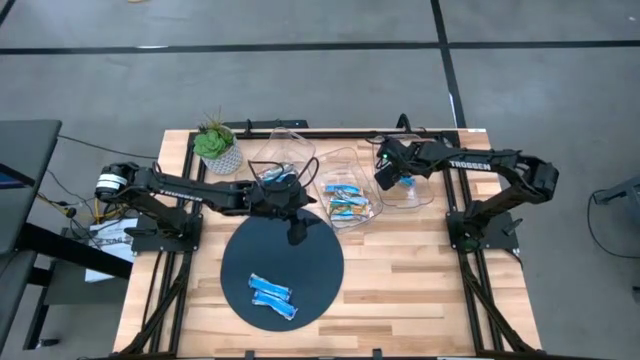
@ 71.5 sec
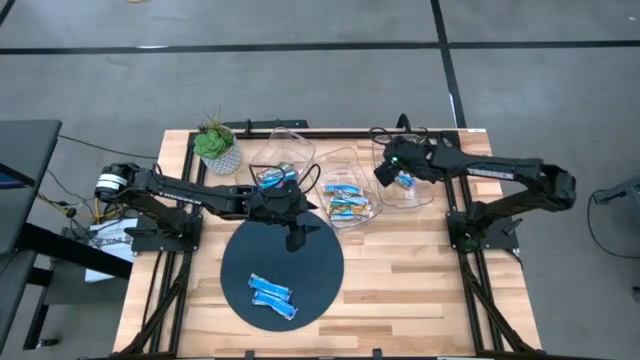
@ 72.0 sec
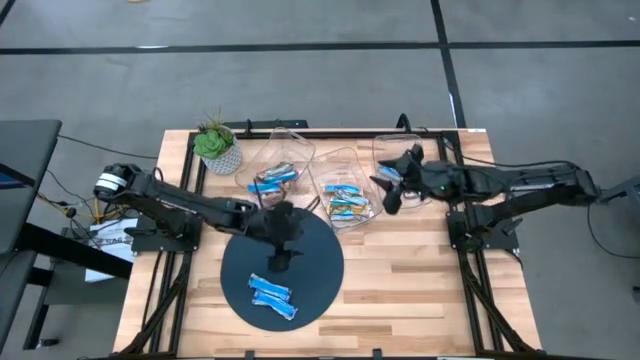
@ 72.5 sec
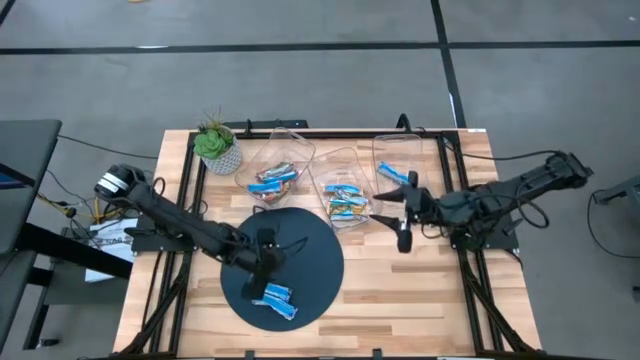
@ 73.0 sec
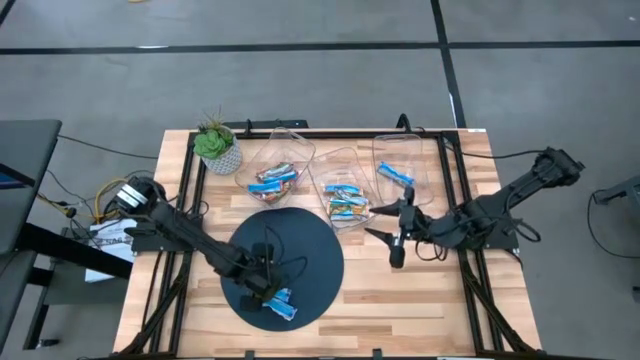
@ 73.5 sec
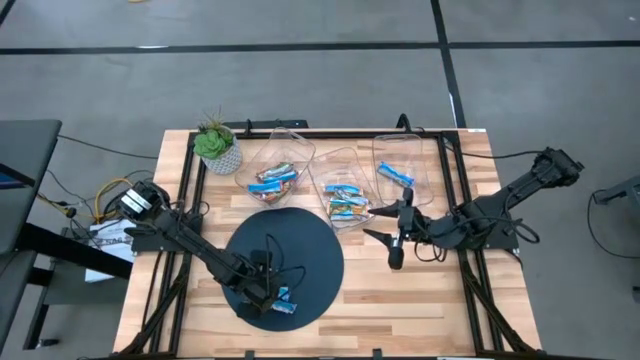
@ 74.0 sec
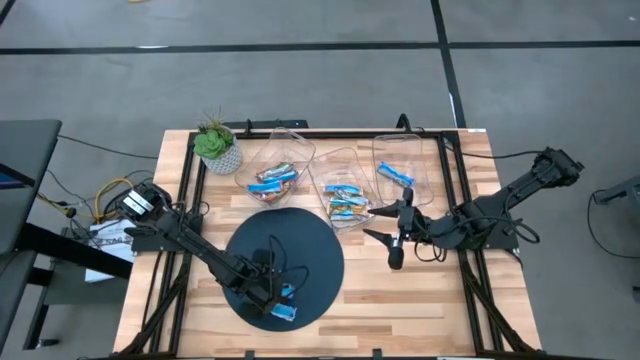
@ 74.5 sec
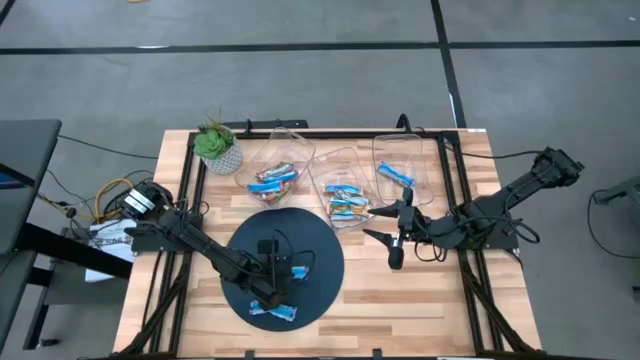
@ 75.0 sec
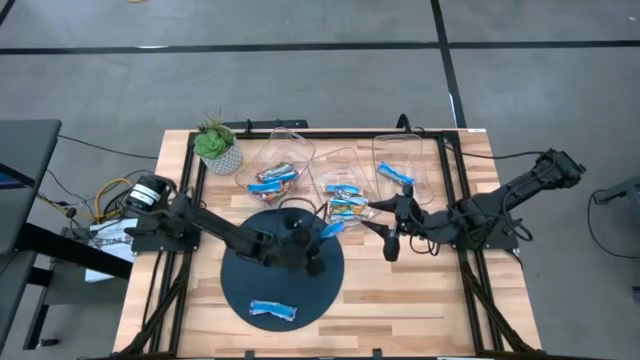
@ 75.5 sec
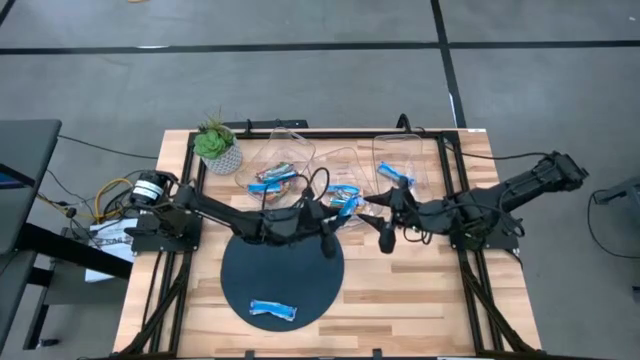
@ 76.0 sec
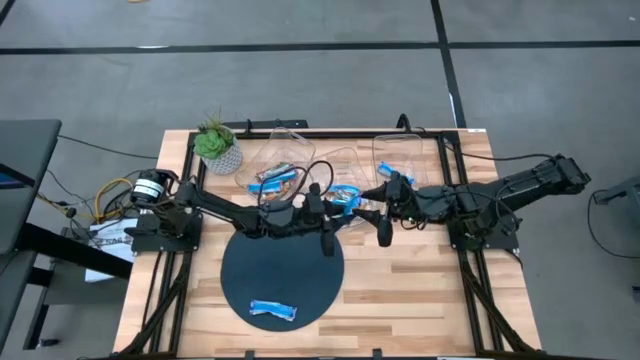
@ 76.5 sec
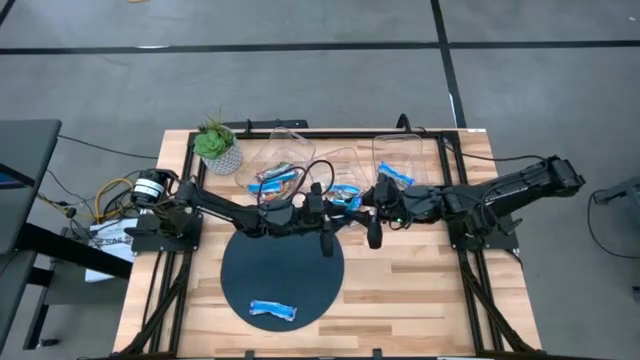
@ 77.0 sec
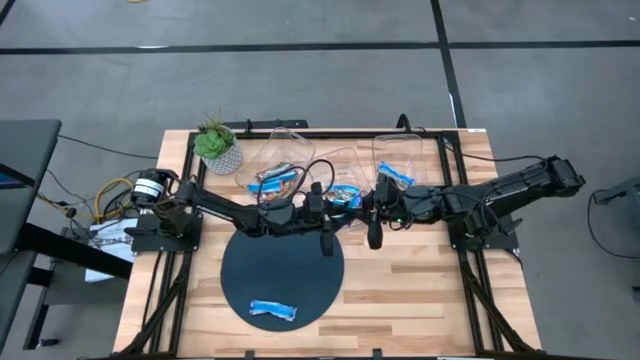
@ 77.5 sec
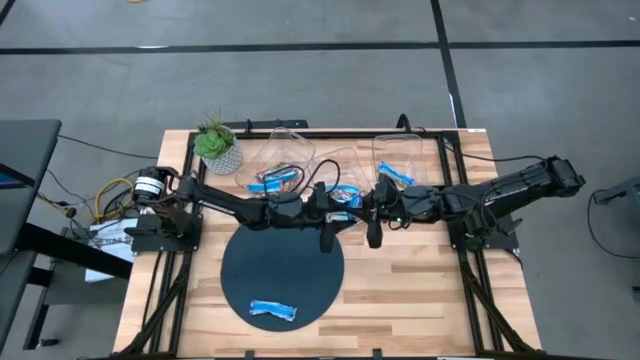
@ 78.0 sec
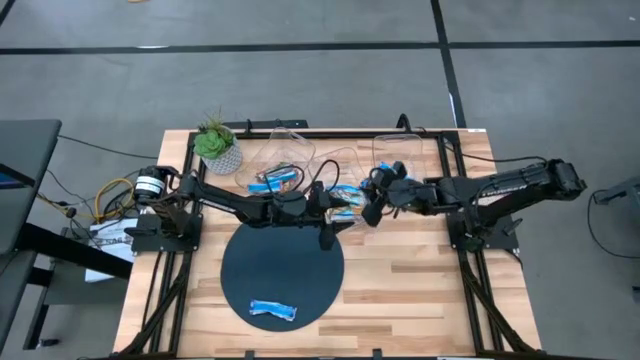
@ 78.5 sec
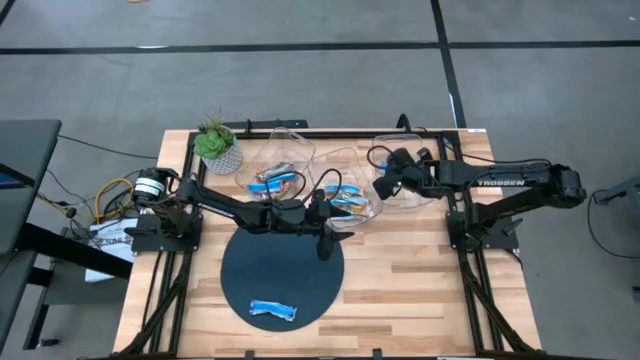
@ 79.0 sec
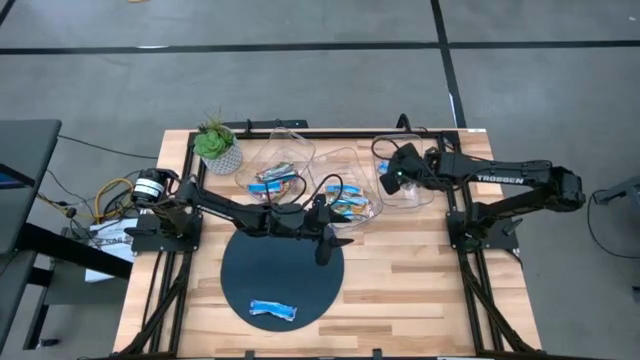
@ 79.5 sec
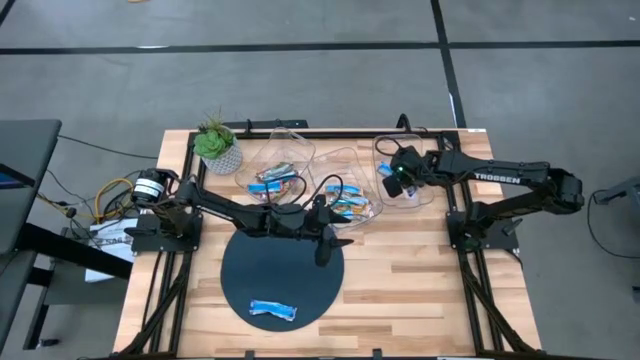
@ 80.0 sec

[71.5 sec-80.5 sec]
Task: Pick and place Granola Bars by type
Put the blue granola bar into the right transparent bin

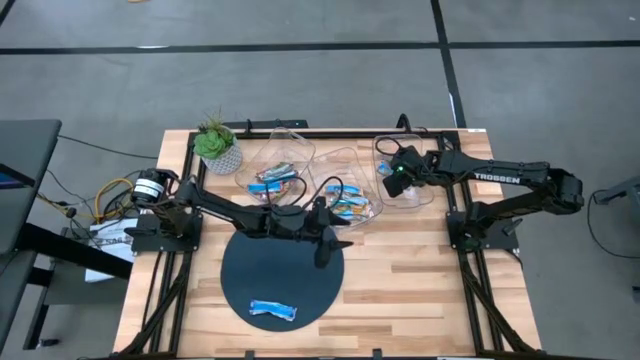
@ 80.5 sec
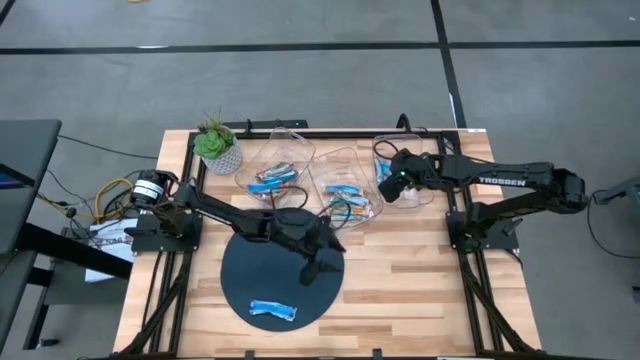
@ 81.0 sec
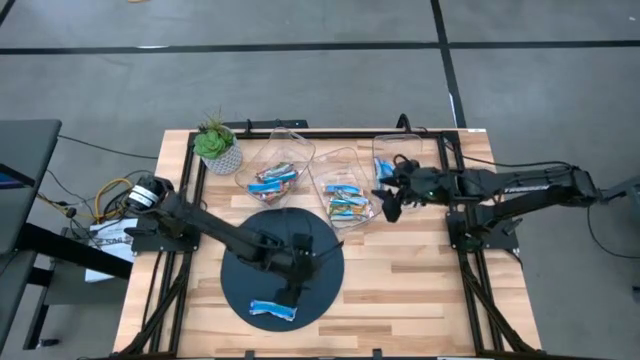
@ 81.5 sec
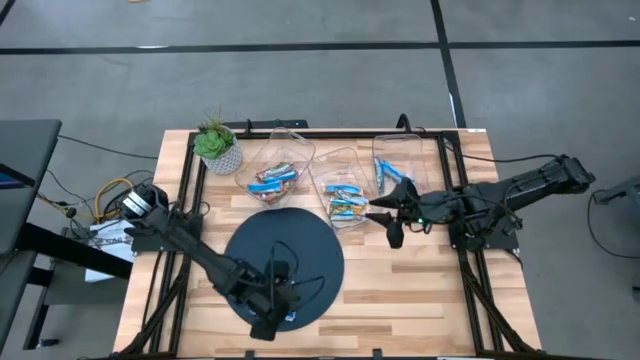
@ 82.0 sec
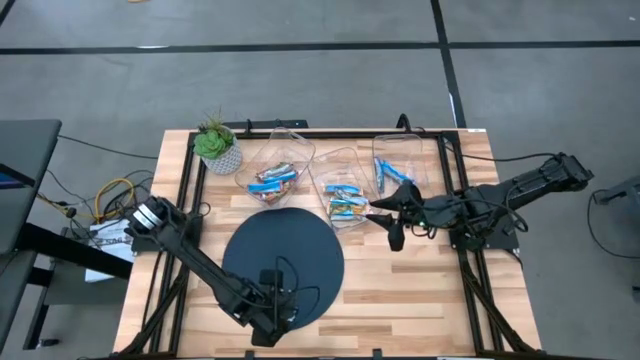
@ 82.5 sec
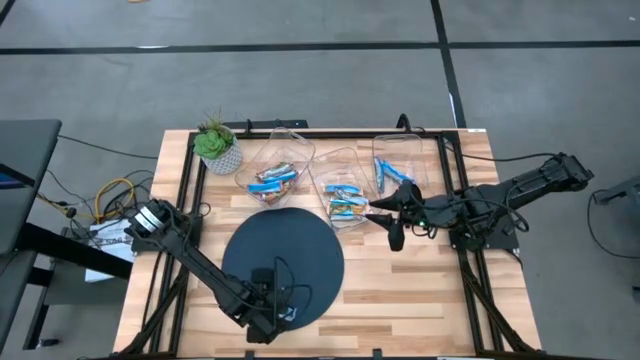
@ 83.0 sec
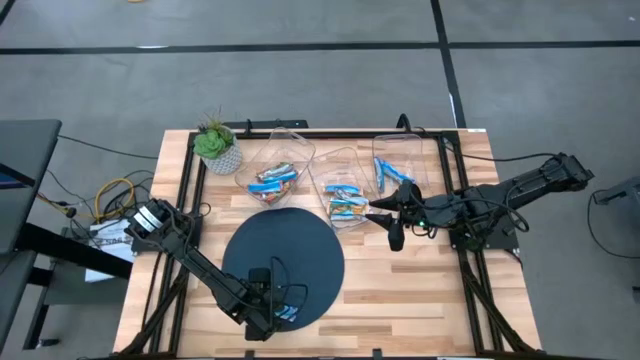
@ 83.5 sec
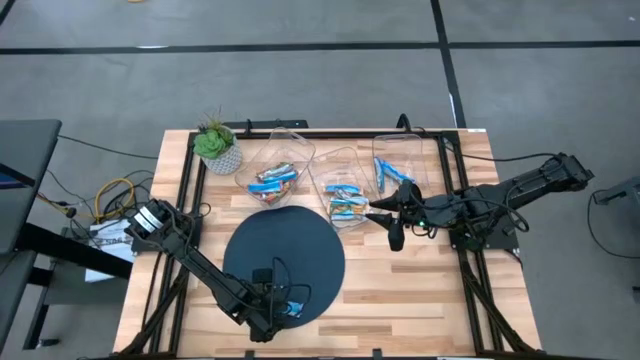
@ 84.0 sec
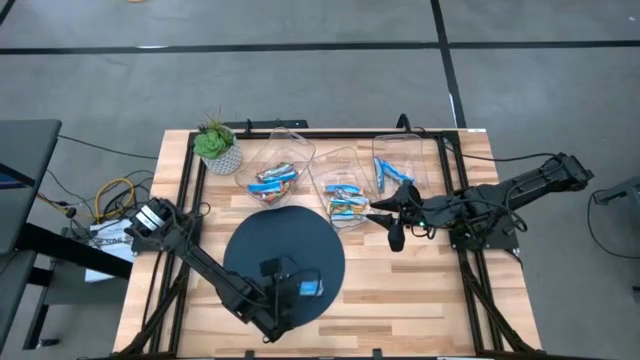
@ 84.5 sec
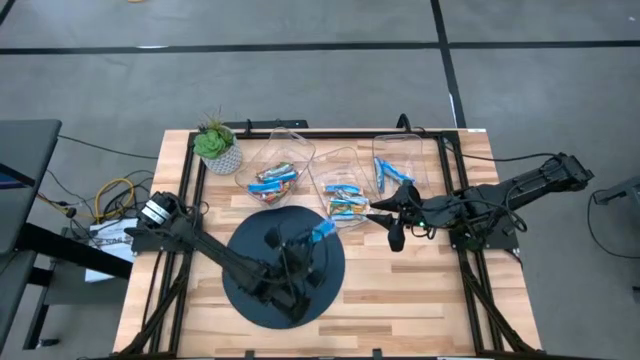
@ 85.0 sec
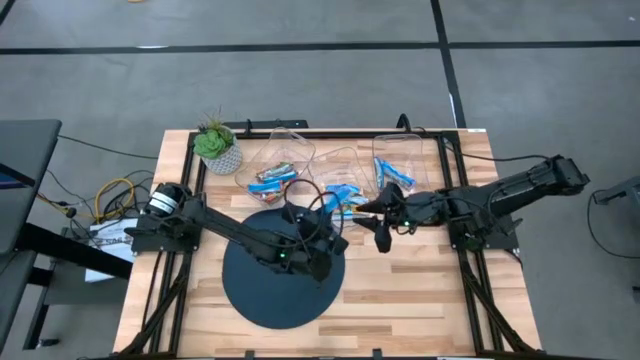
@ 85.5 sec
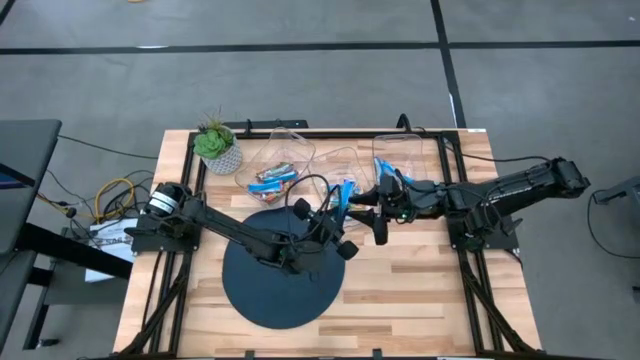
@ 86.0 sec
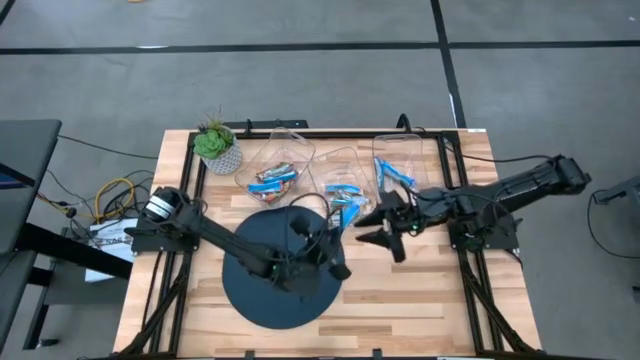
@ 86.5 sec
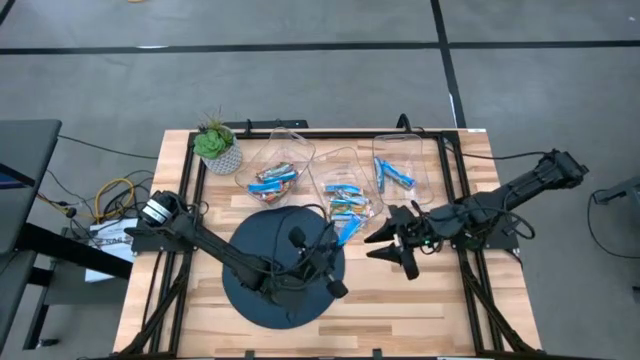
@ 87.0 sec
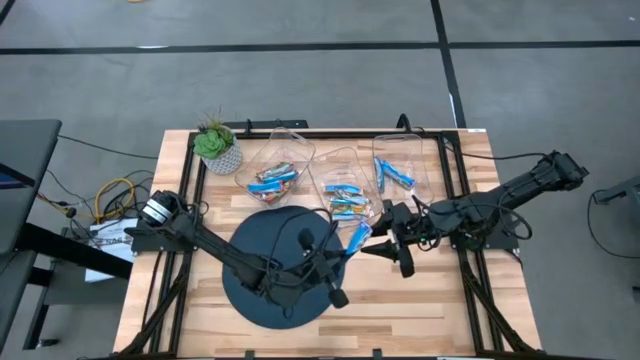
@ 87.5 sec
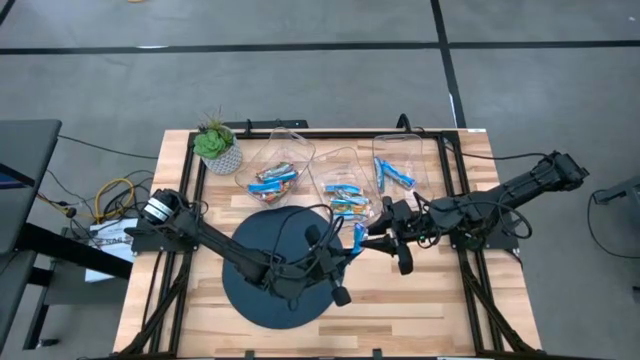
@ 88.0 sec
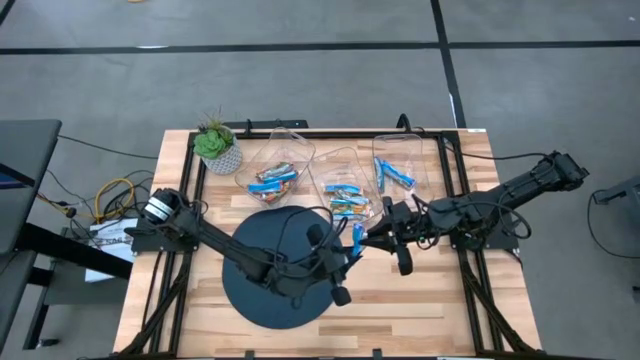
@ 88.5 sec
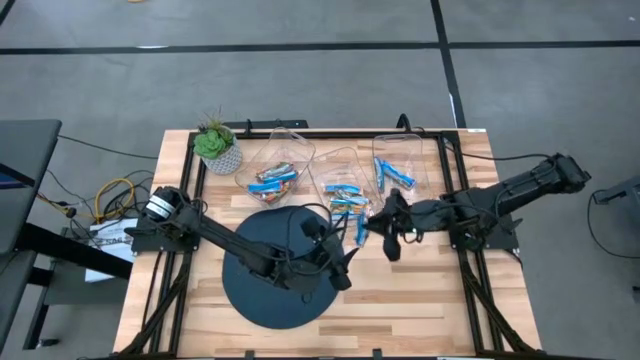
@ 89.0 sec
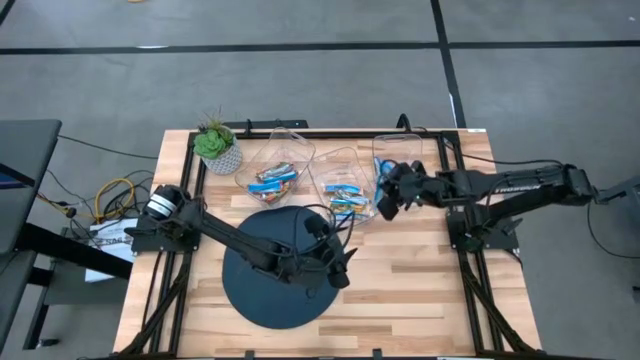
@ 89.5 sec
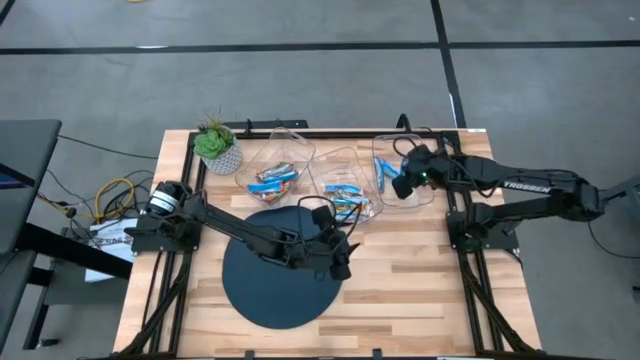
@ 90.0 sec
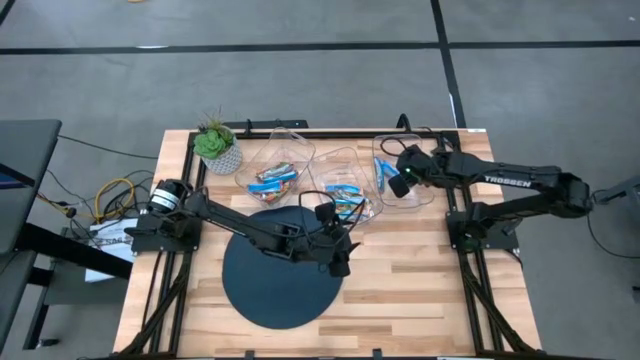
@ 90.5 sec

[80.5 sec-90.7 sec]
Put the blue granola bar into the right transparent bin
